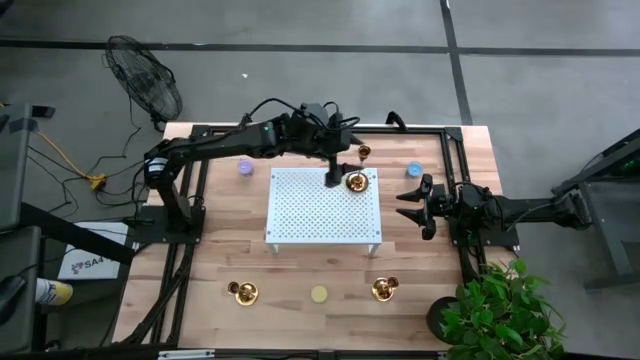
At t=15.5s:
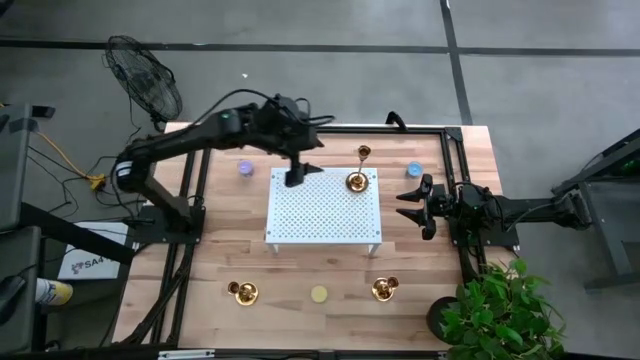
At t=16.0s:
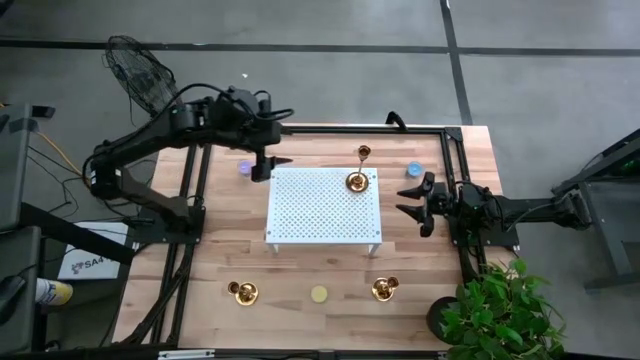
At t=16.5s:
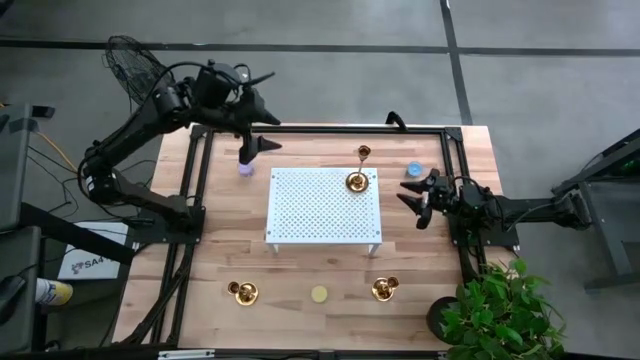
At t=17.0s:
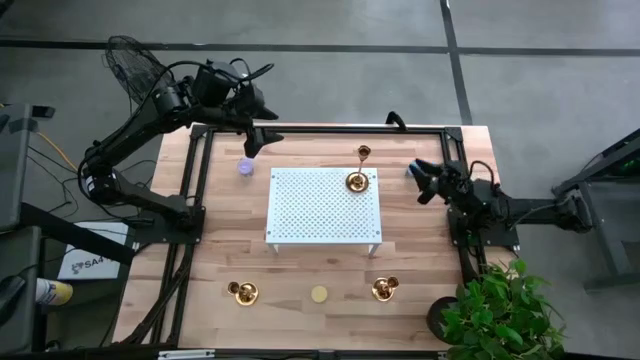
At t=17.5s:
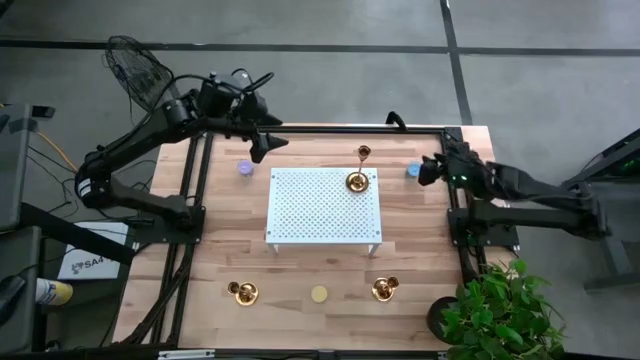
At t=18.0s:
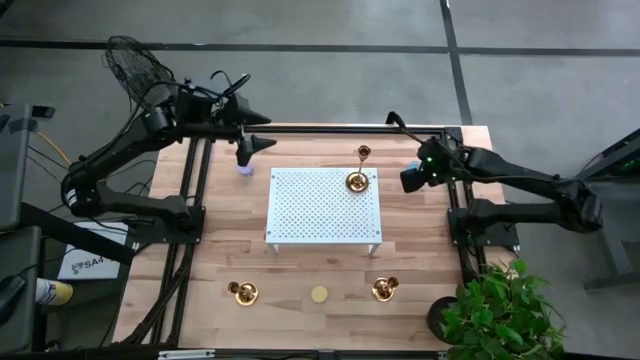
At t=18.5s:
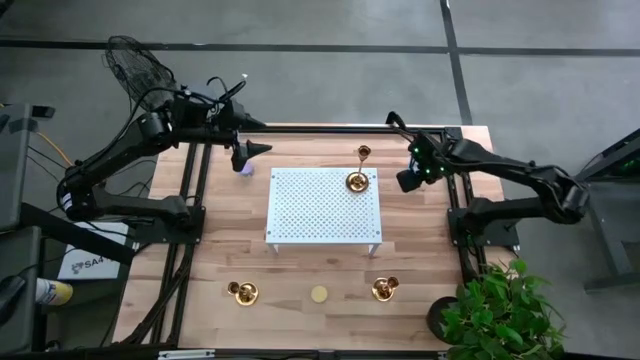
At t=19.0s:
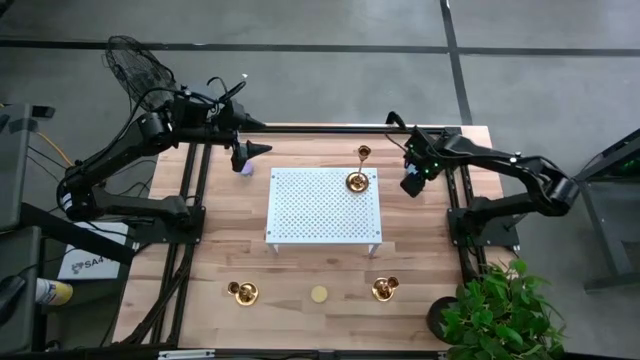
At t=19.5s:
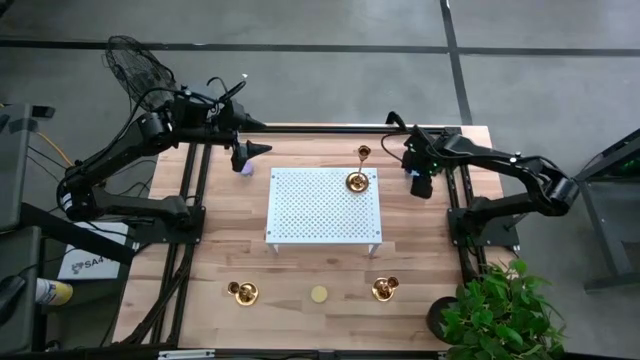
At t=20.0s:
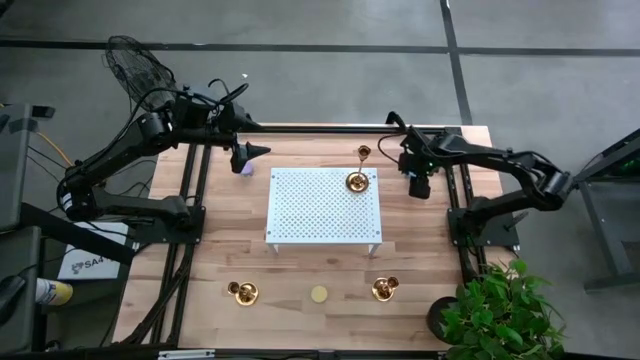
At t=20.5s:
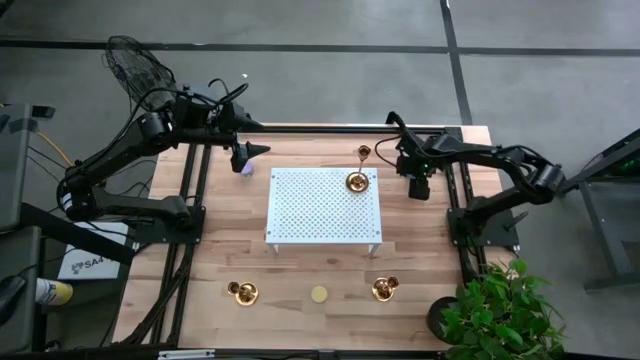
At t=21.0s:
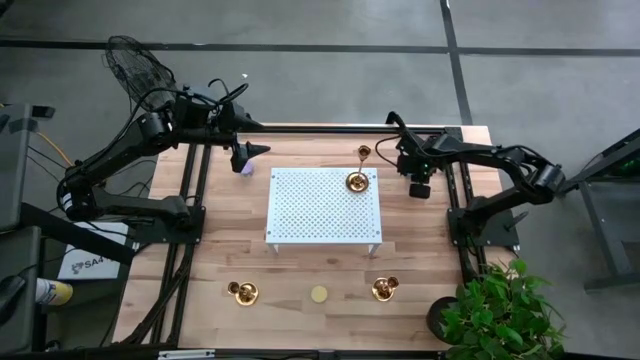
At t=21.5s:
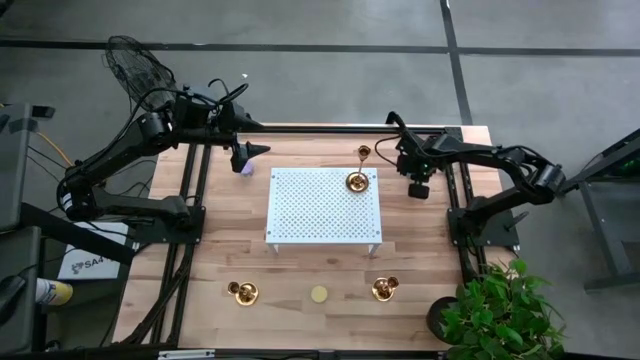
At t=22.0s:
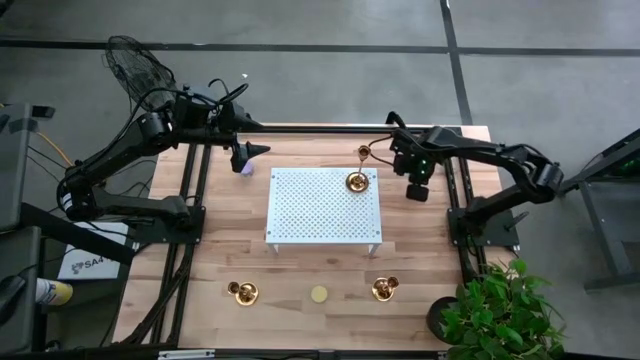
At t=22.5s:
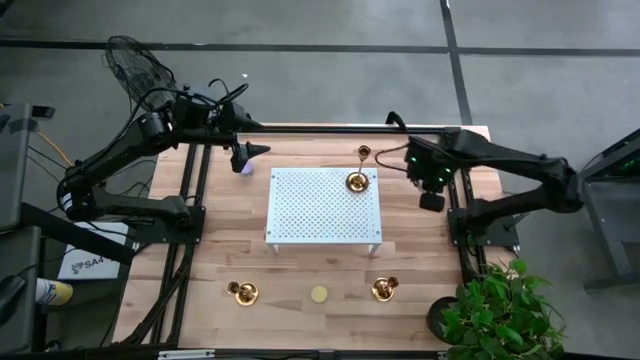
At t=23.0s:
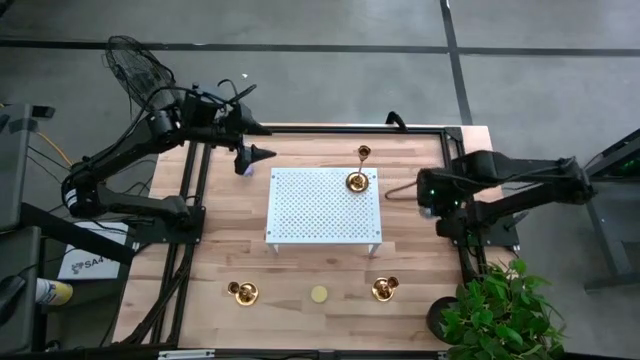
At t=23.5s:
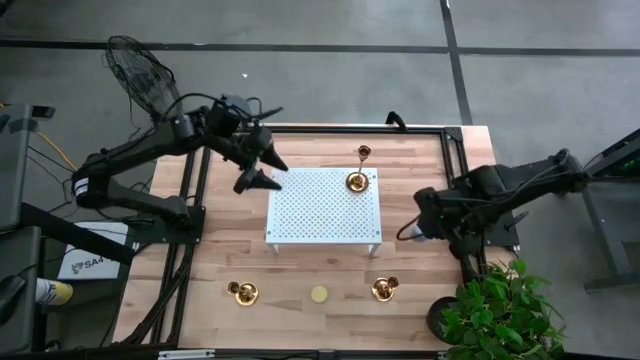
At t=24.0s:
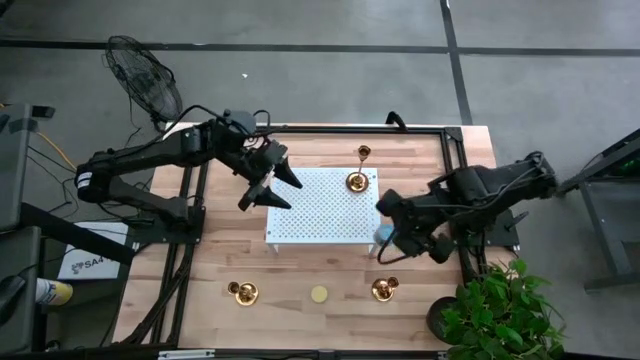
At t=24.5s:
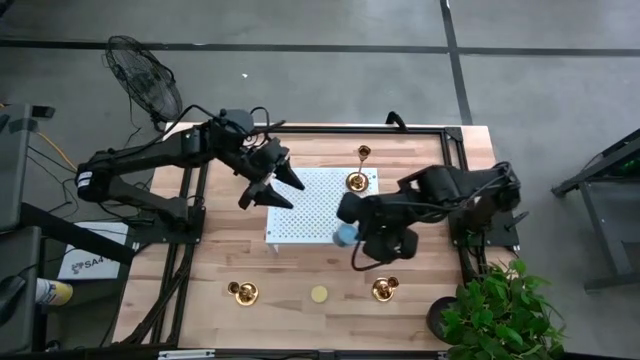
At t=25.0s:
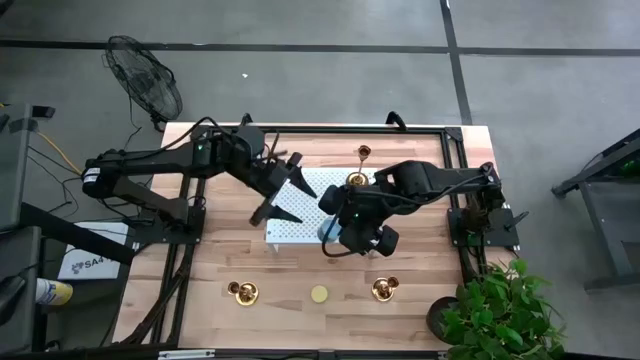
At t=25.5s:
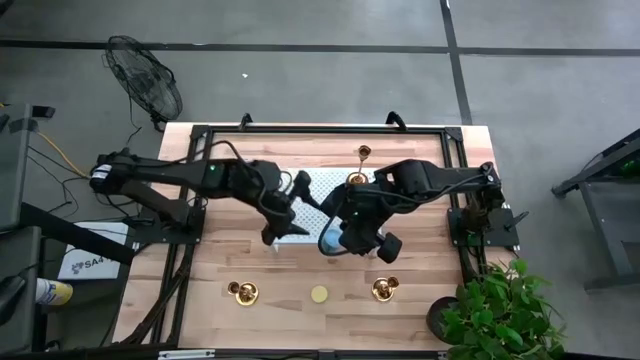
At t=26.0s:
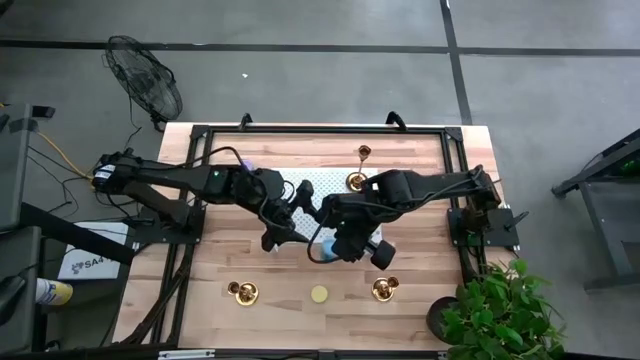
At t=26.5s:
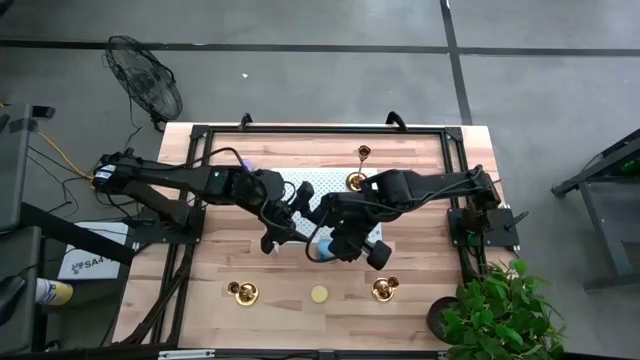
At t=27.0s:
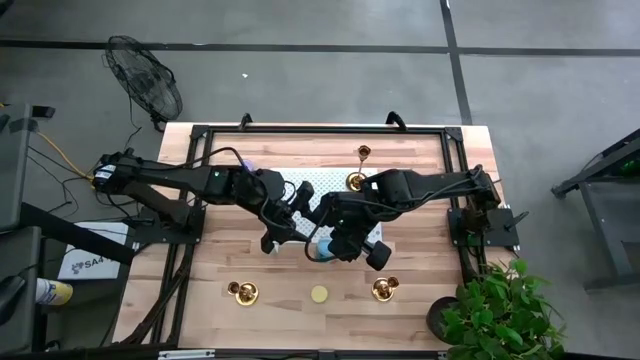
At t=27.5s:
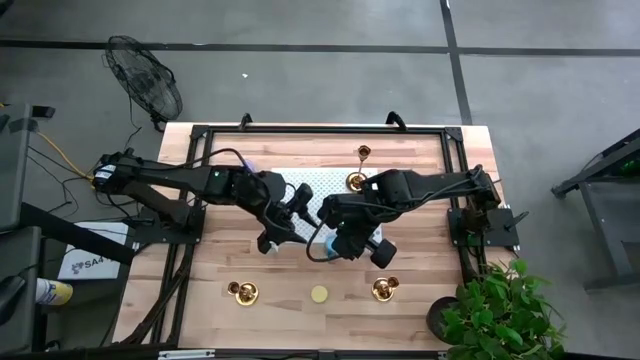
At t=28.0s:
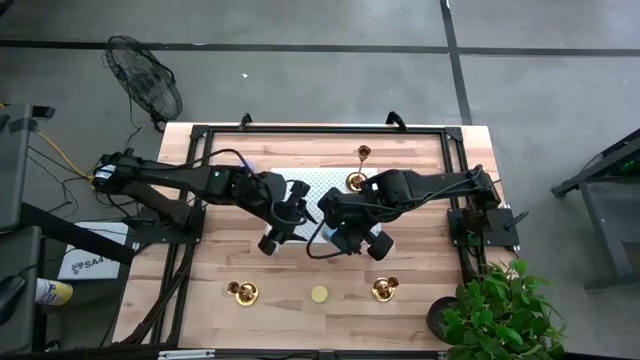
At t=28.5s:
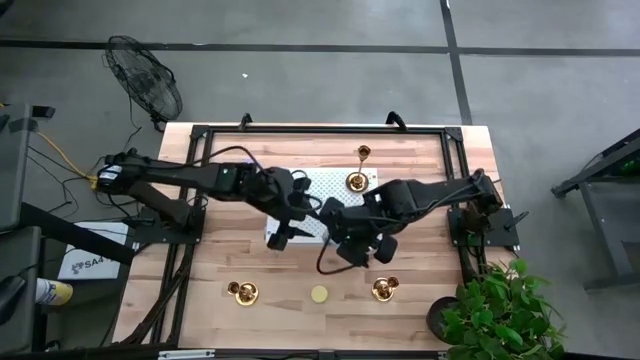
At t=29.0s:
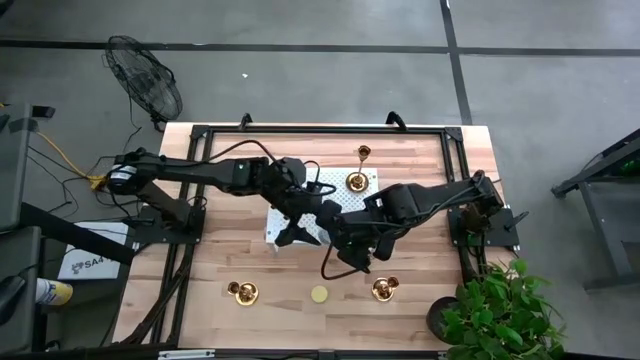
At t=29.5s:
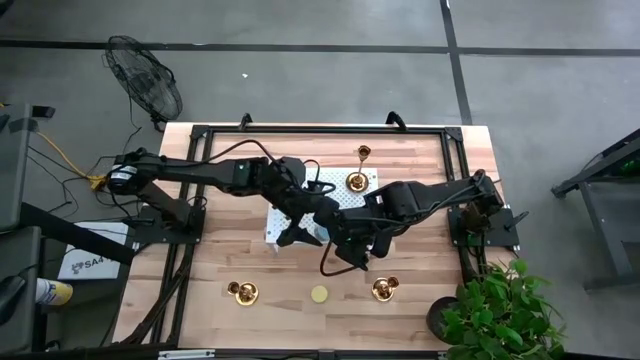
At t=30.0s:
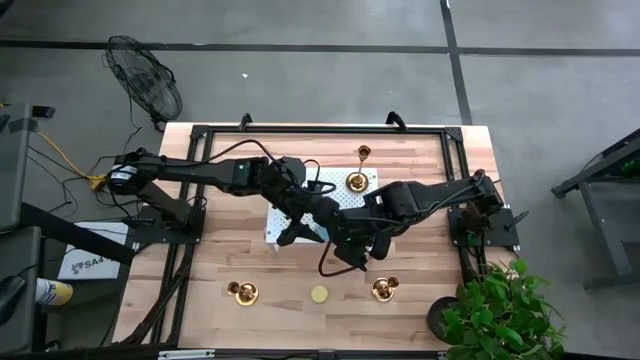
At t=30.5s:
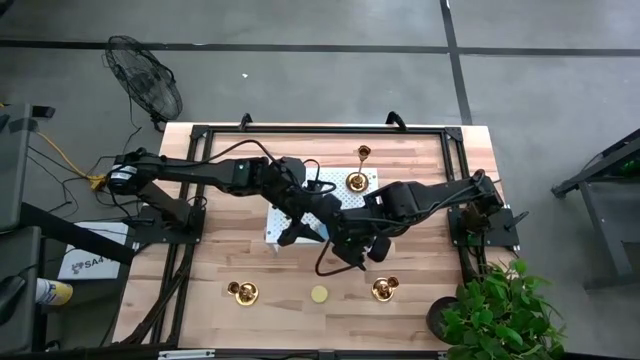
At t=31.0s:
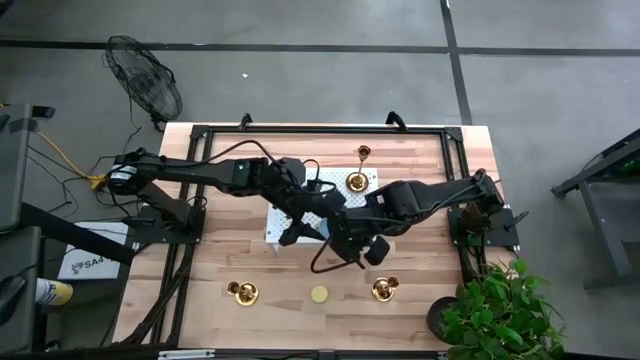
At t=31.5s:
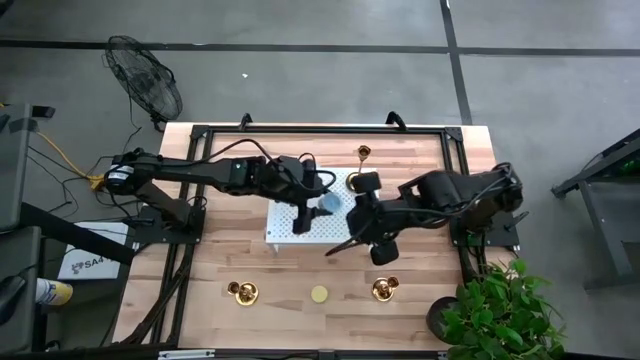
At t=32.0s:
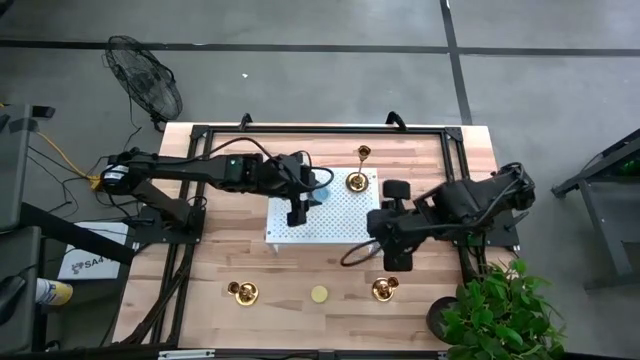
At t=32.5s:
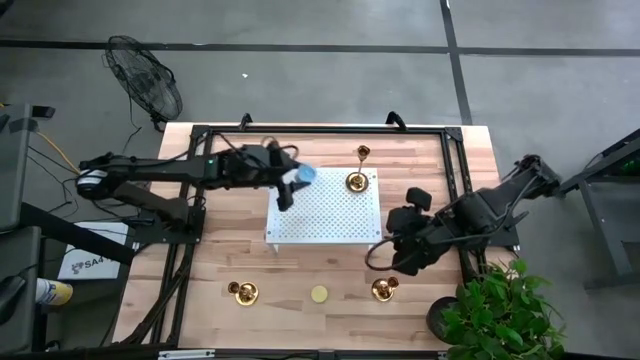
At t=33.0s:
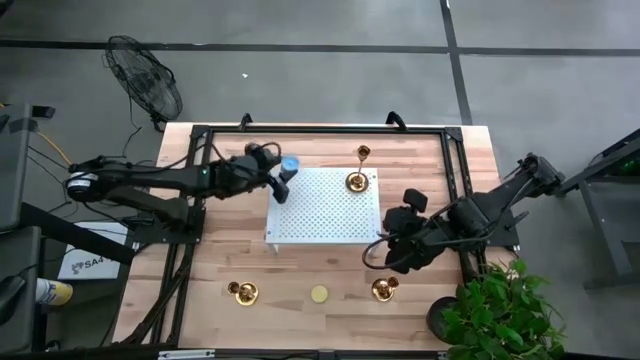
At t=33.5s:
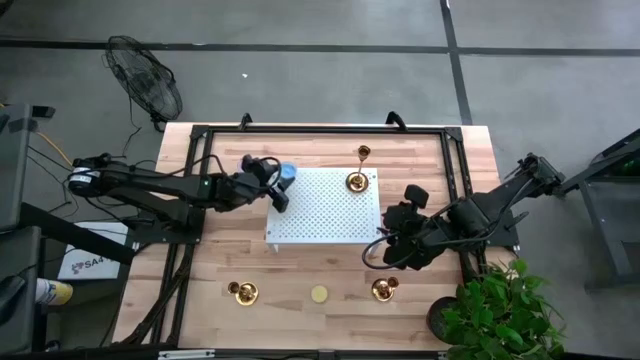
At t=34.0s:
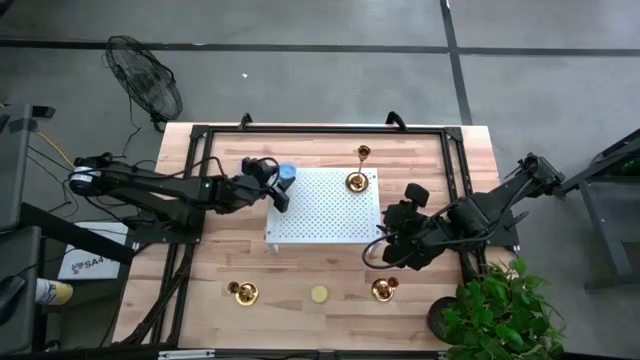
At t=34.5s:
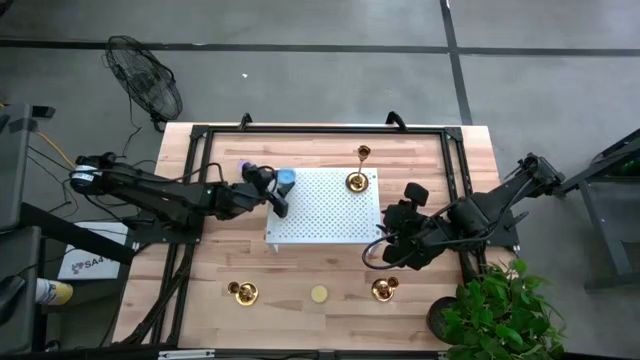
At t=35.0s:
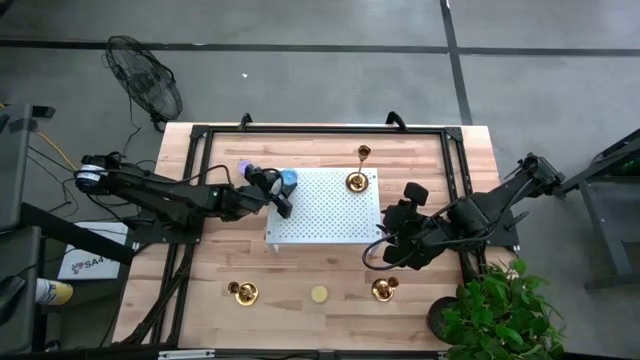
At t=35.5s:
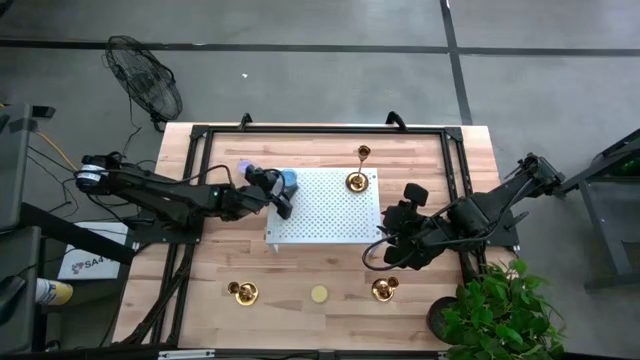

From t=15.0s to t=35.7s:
Task: Pick & Place candle stick holders
Put the blue scented candle on the shelf
